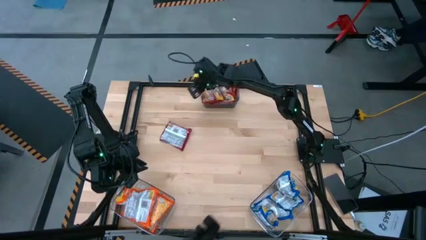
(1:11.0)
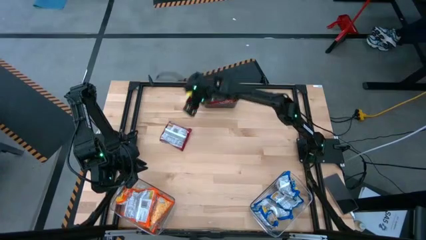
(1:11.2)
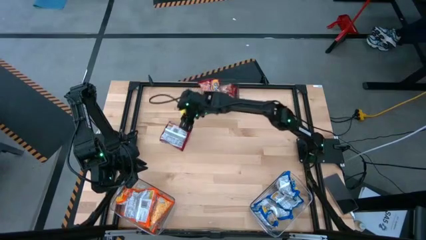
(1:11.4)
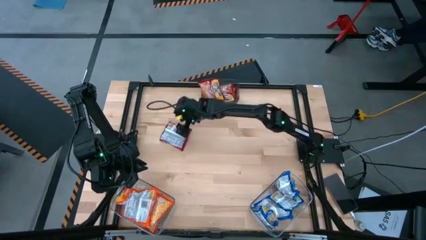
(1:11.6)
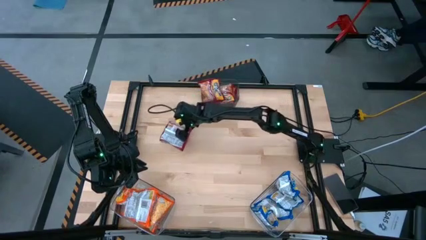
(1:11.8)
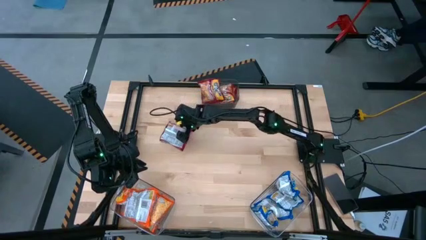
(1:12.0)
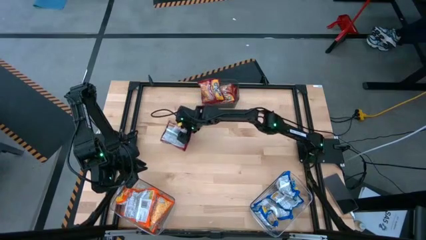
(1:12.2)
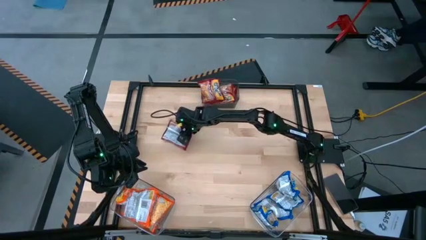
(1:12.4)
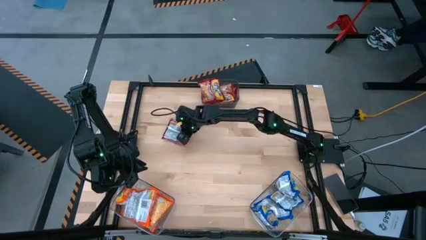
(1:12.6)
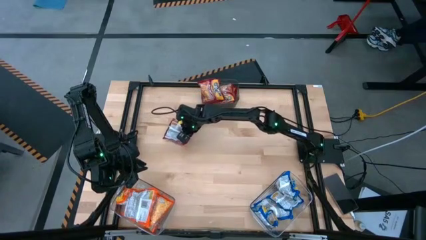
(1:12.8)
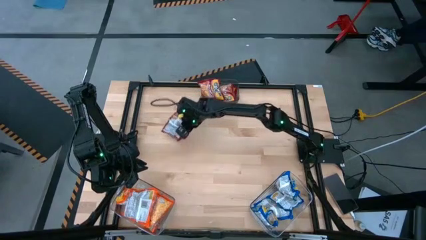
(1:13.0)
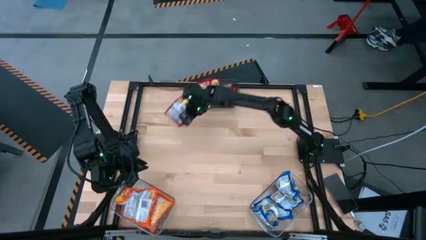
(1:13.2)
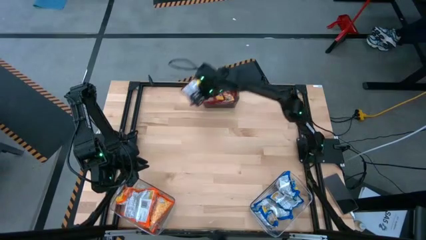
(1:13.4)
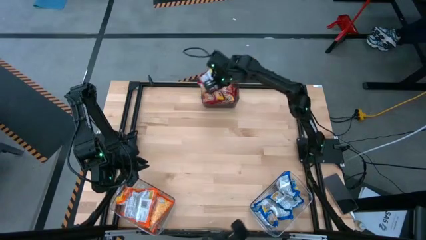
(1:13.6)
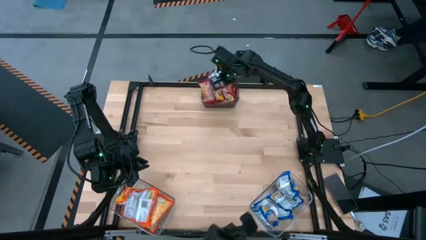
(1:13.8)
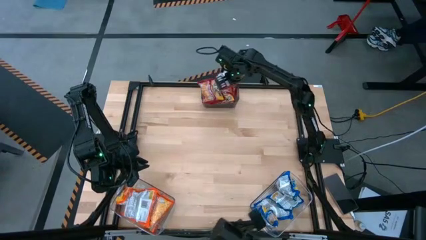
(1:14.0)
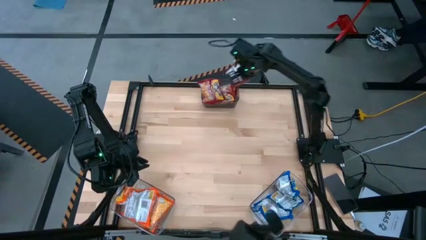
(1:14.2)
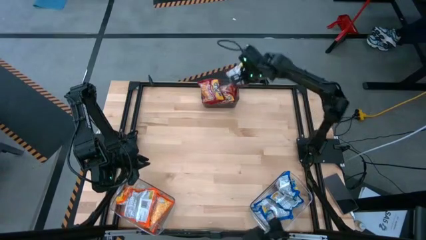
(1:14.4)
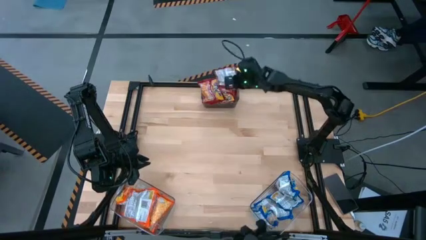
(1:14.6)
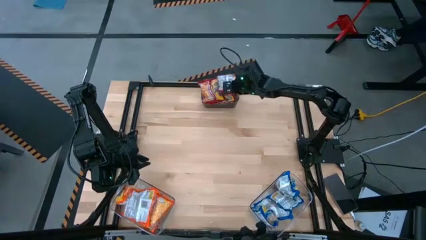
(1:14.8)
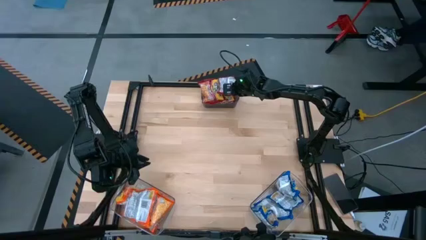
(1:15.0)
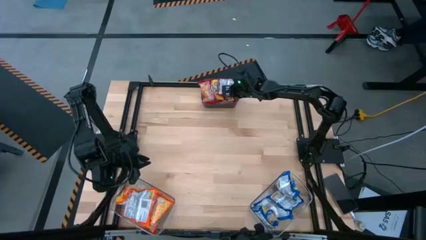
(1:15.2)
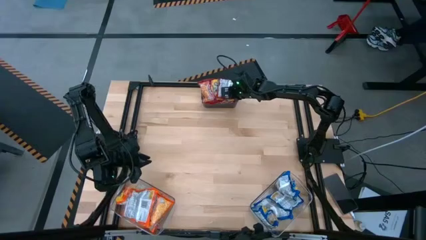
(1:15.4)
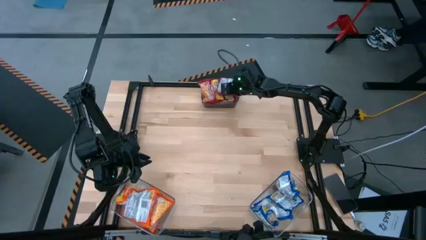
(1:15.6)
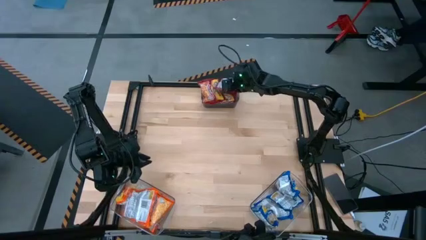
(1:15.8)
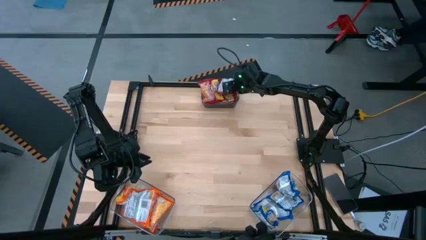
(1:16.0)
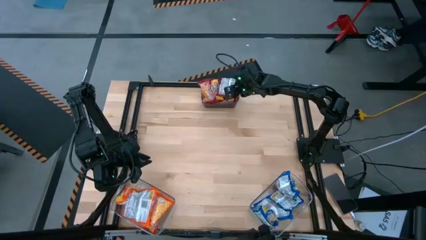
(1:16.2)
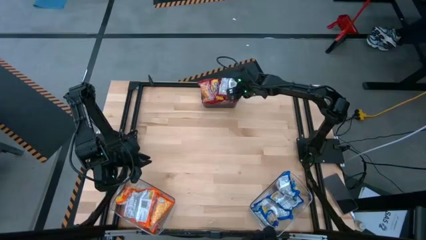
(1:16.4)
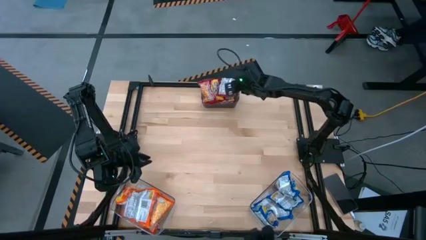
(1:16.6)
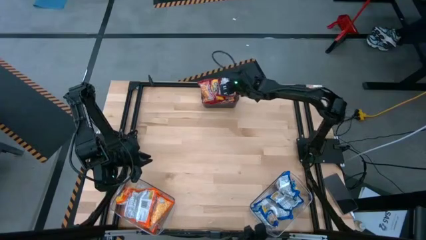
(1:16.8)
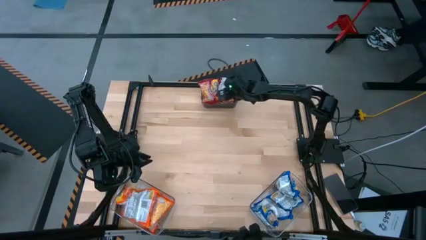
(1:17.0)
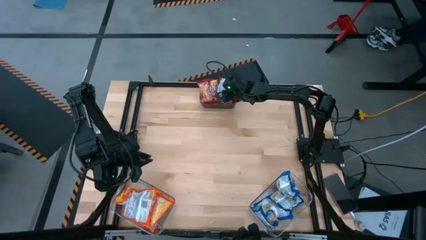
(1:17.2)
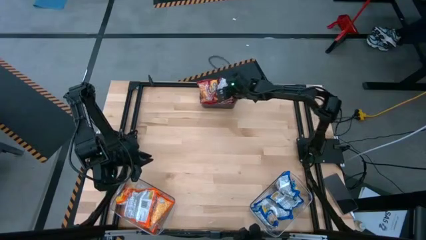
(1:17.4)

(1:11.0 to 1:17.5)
Task: Sort Maruchan noodles
Put the red noodle pack into the black bin

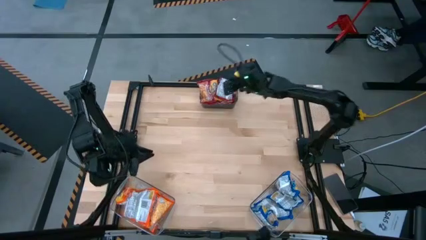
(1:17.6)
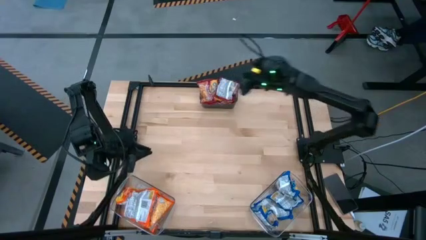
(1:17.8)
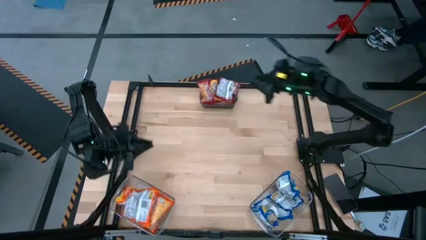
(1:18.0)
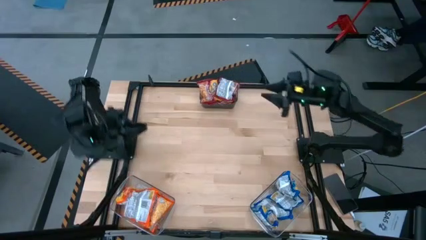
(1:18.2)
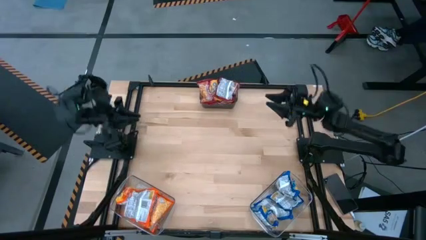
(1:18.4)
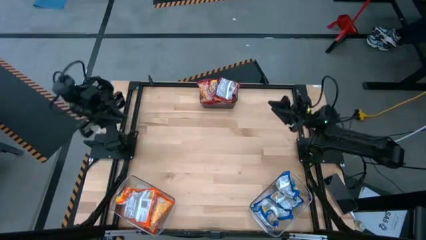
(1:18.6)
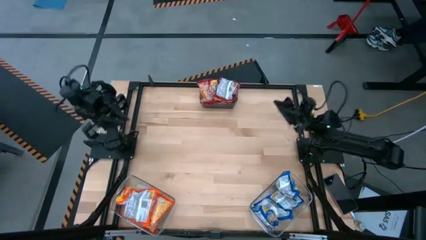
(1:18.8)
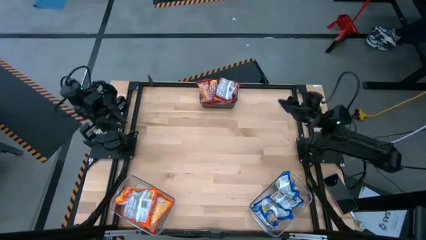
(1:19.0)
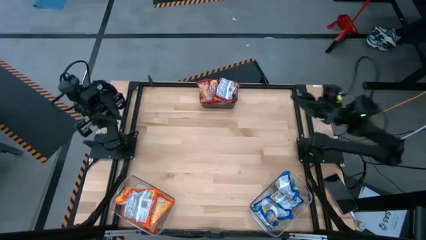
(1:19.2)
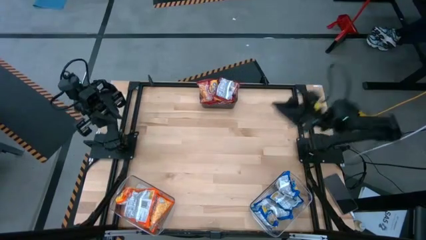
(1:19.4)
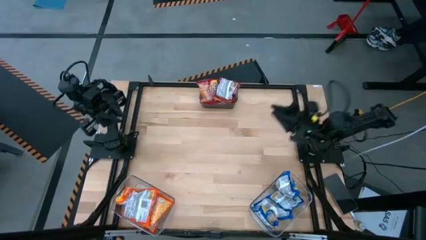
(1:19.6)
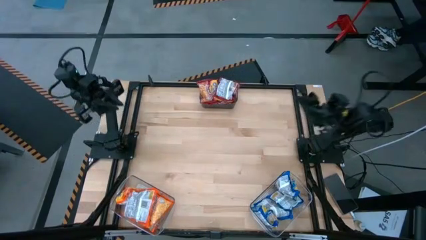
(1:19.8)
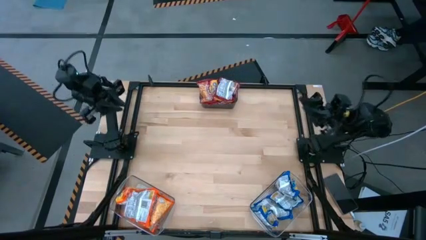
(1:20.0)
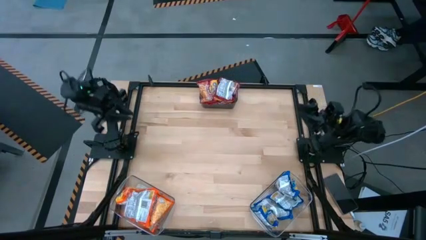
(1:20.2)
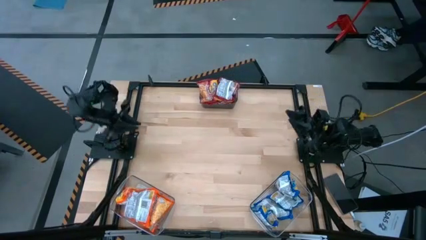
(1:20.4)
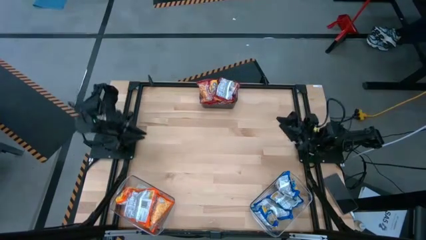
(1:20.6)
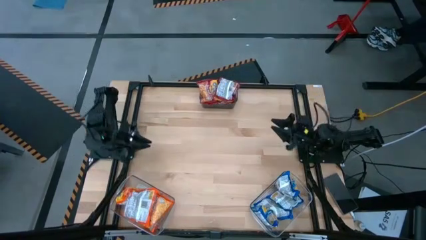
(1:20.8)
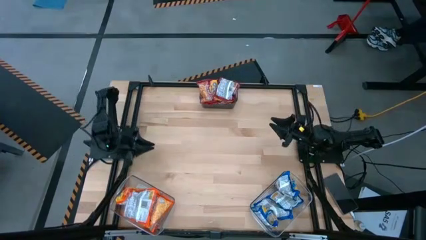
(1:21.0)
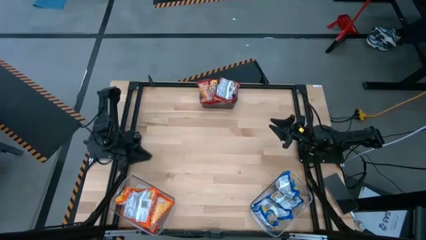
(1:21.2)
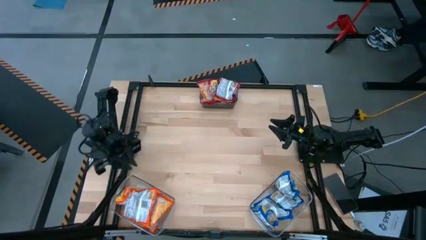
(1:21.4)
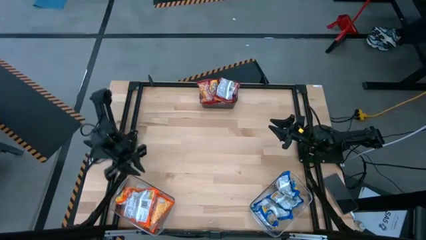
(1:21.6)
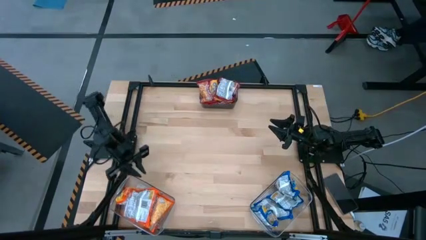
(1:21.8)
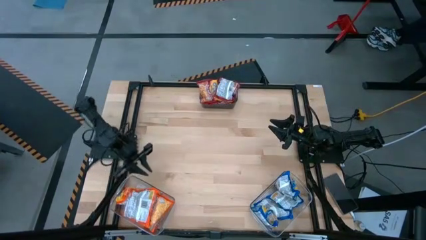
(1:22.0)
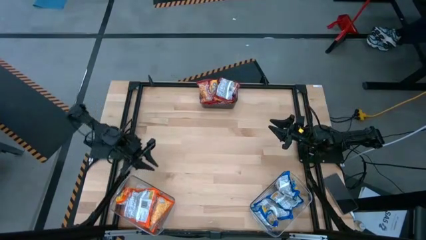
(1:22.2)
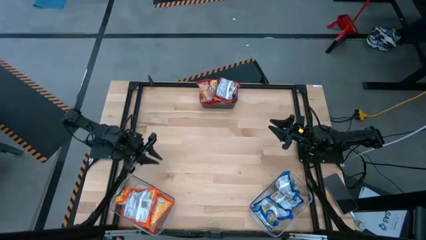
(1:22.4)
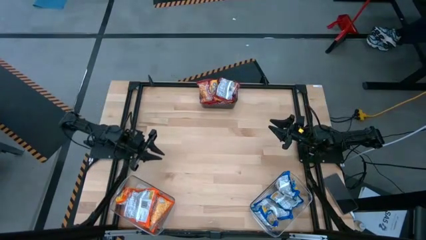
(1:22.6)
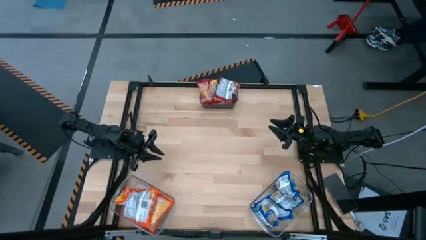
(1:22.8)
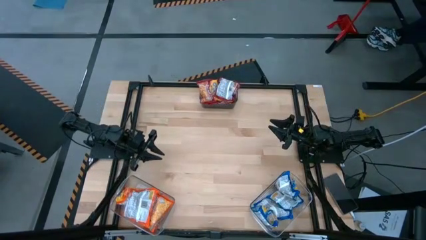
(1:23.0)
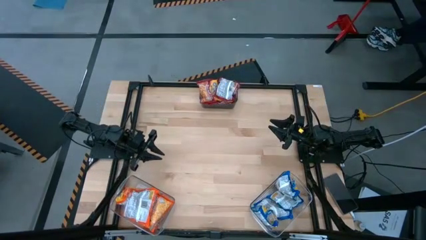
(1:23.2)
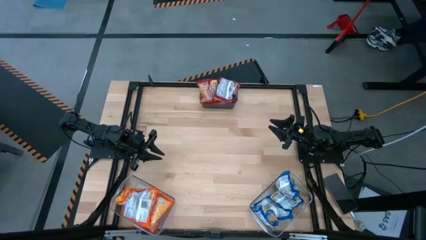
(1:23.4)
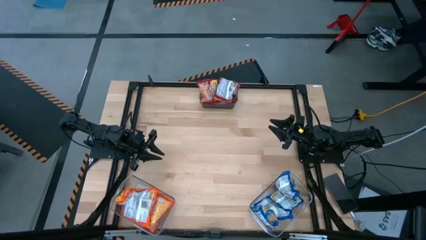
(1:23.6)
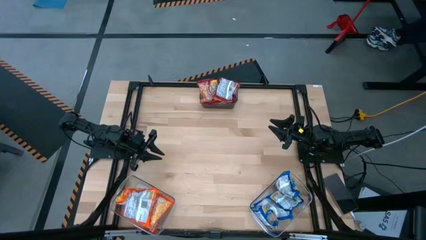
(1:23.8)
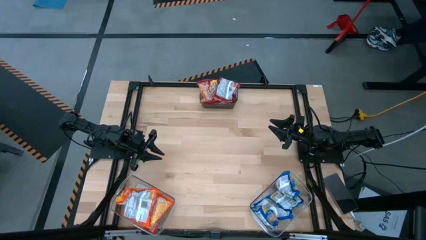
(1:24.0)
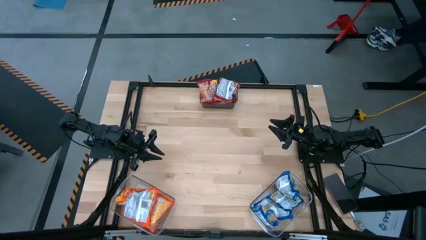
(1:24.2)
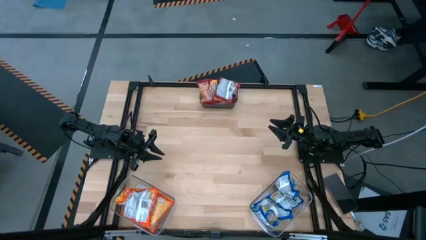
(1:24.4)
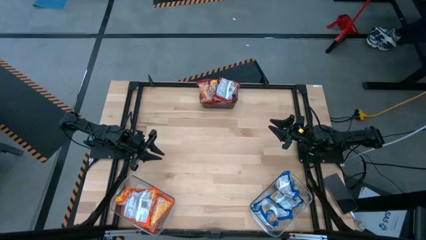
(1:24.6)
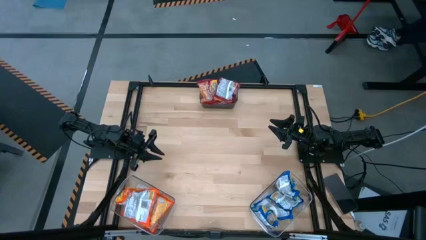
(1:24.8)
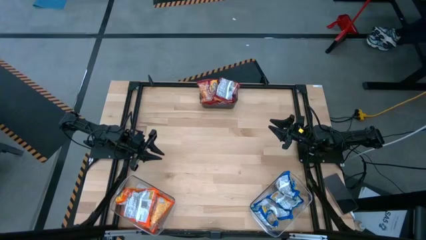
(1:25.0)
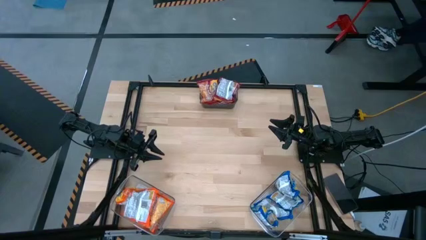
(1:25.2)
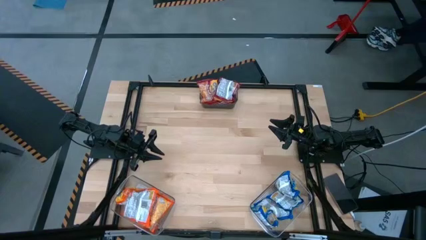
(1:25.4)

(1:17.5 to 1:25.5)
Return to Home Position
